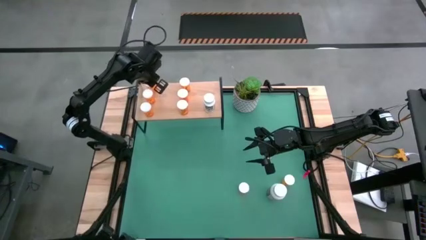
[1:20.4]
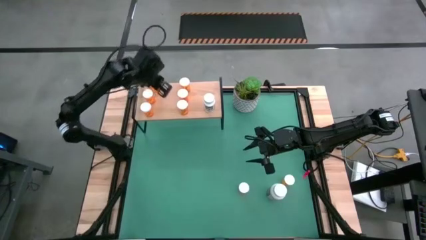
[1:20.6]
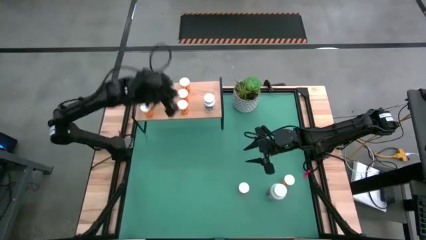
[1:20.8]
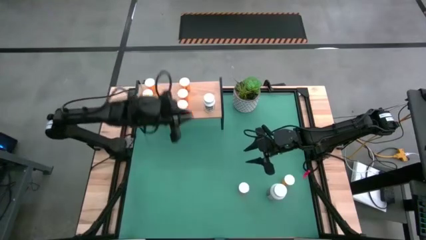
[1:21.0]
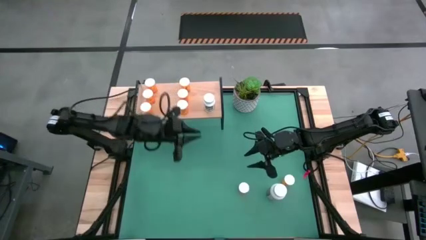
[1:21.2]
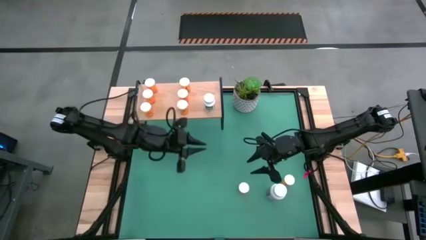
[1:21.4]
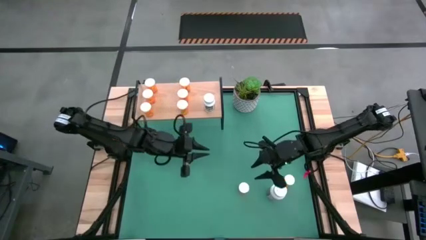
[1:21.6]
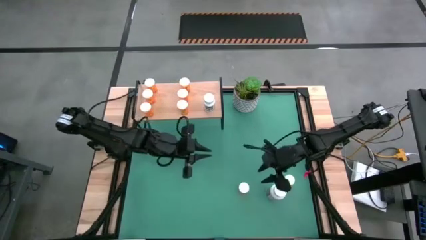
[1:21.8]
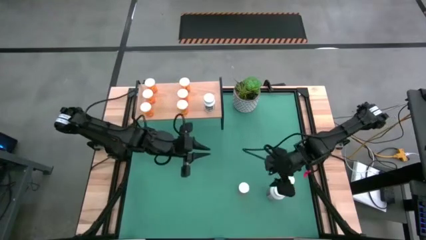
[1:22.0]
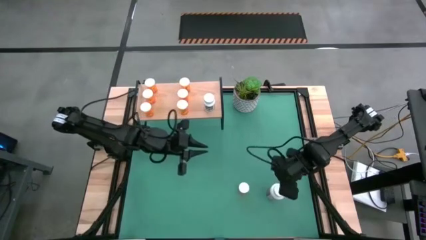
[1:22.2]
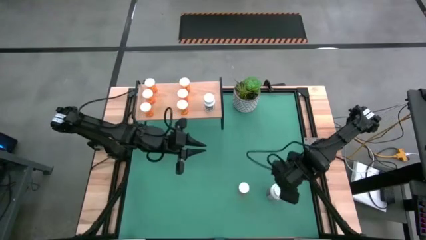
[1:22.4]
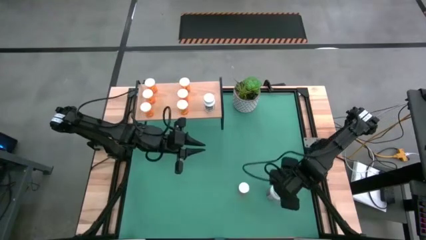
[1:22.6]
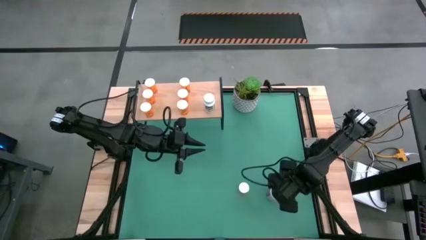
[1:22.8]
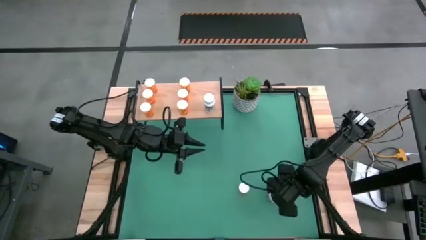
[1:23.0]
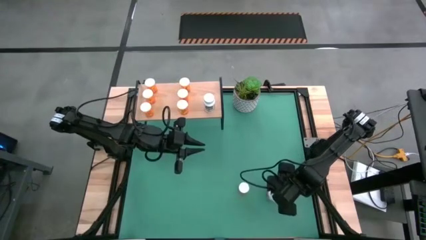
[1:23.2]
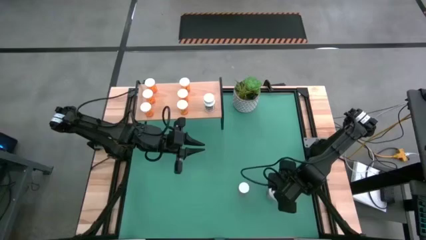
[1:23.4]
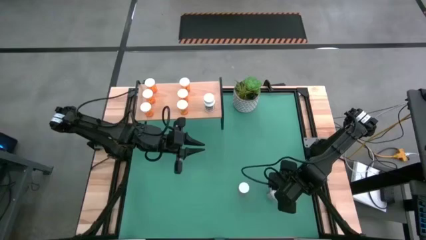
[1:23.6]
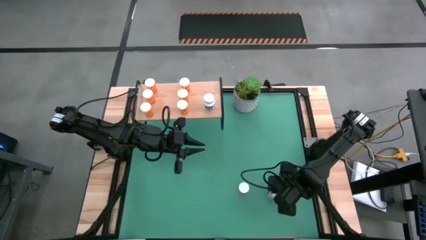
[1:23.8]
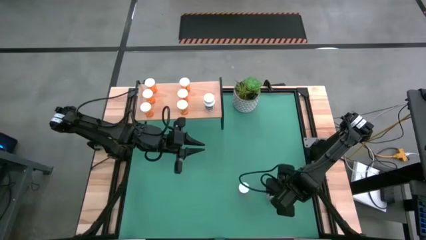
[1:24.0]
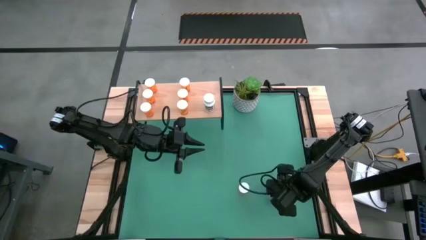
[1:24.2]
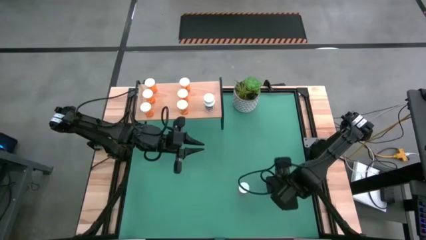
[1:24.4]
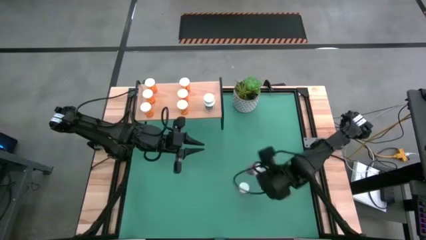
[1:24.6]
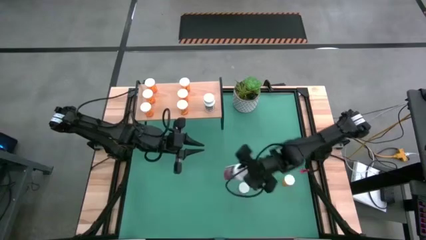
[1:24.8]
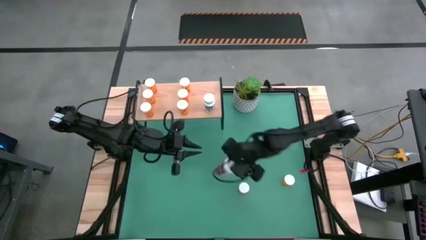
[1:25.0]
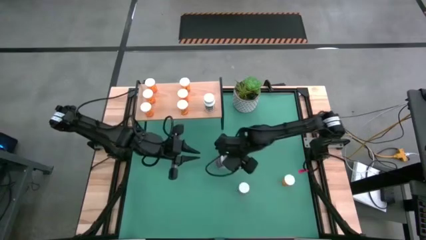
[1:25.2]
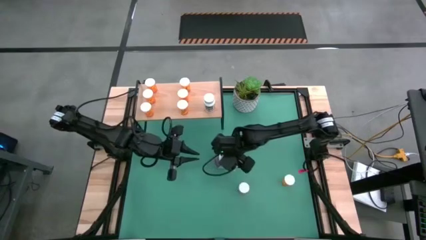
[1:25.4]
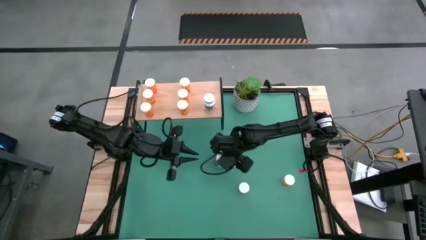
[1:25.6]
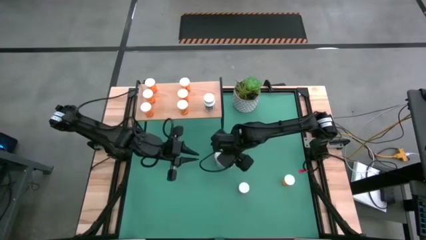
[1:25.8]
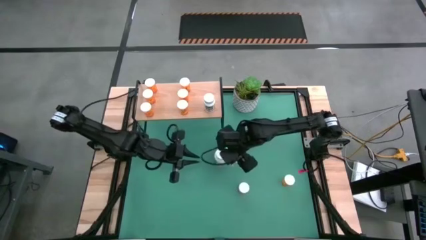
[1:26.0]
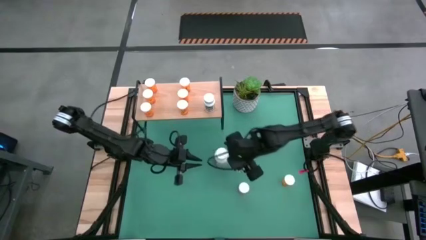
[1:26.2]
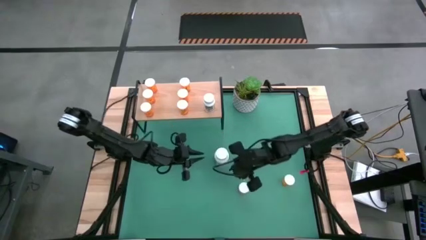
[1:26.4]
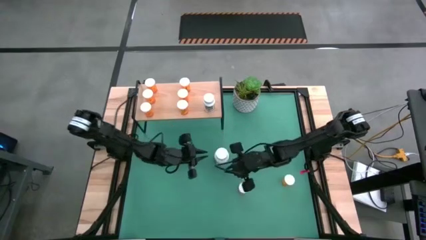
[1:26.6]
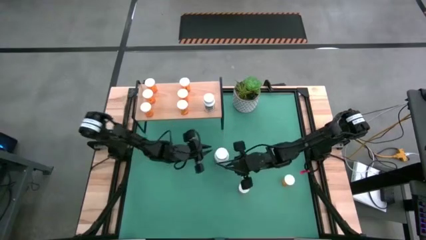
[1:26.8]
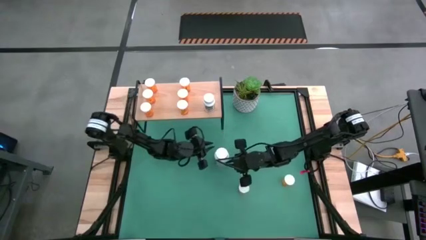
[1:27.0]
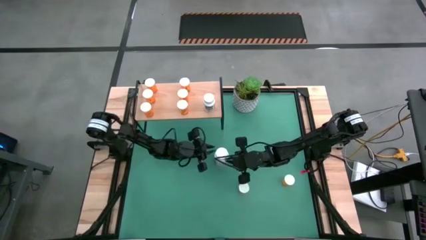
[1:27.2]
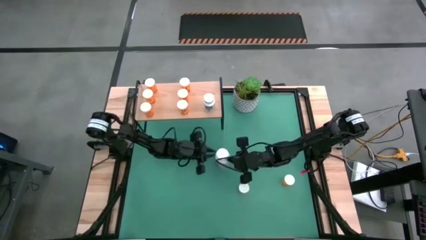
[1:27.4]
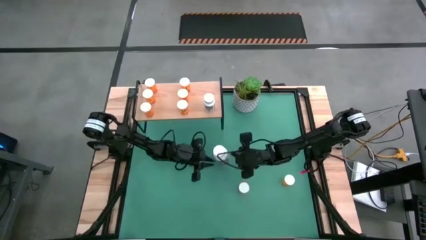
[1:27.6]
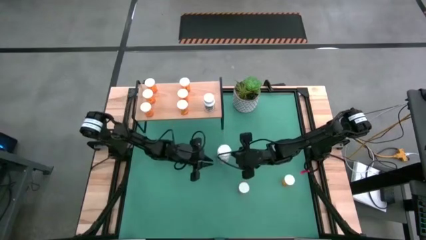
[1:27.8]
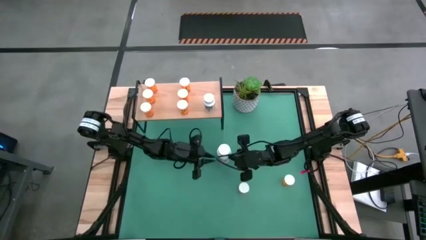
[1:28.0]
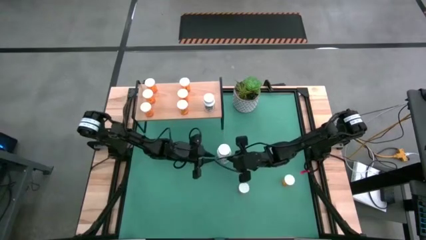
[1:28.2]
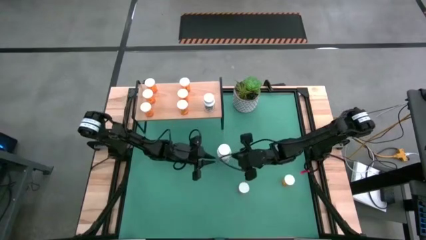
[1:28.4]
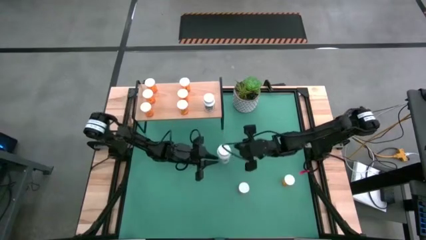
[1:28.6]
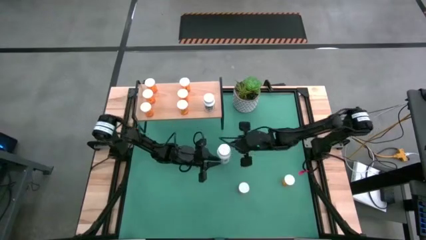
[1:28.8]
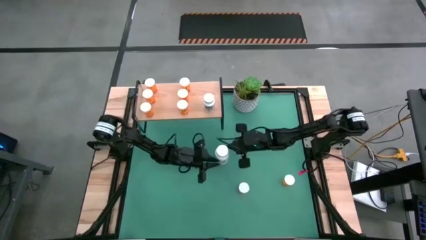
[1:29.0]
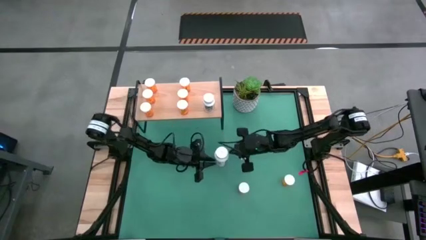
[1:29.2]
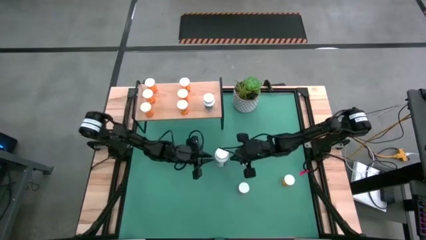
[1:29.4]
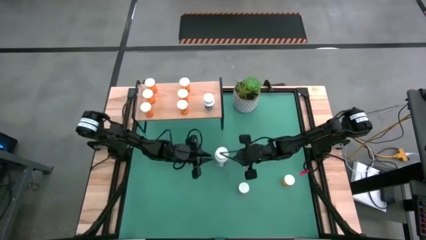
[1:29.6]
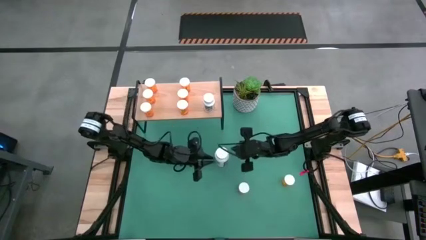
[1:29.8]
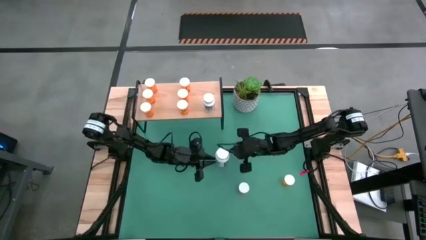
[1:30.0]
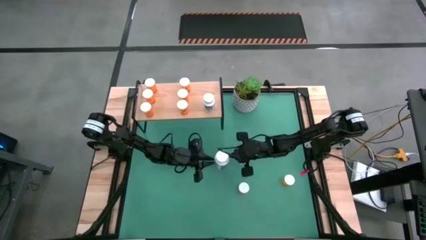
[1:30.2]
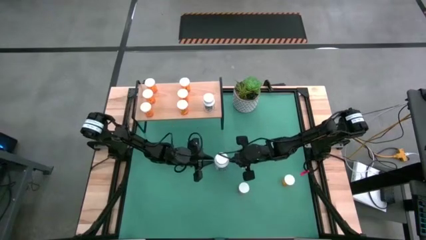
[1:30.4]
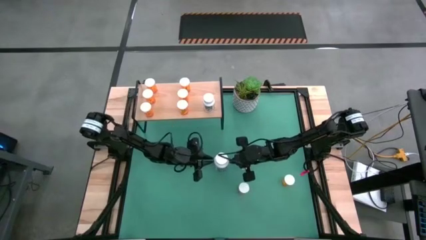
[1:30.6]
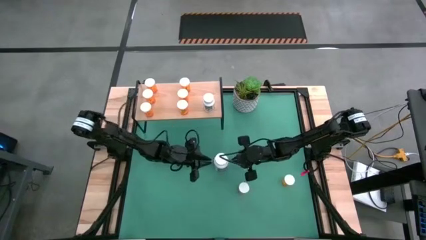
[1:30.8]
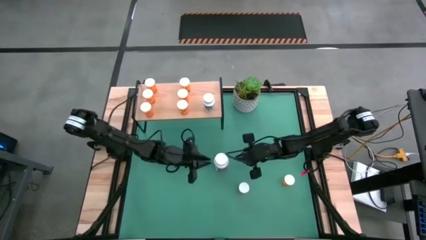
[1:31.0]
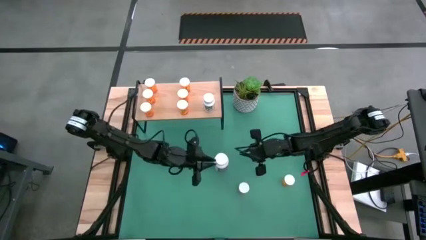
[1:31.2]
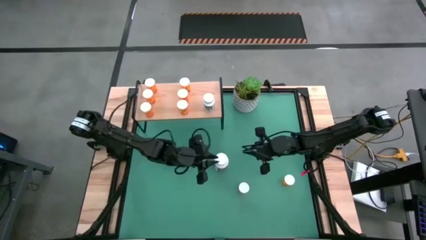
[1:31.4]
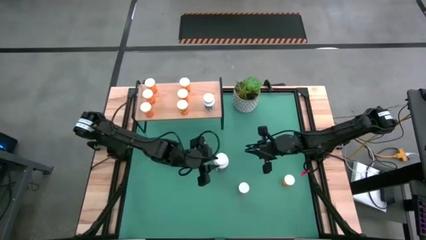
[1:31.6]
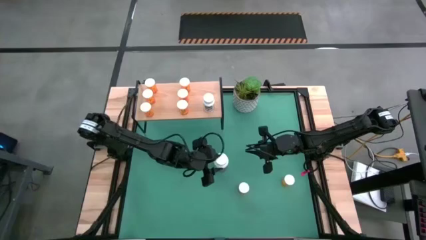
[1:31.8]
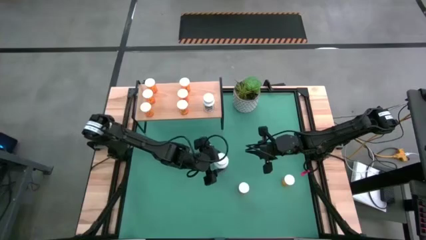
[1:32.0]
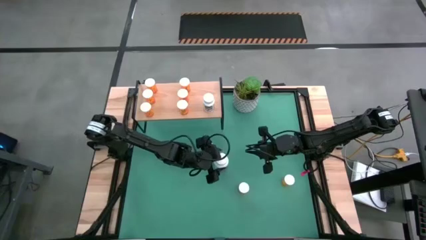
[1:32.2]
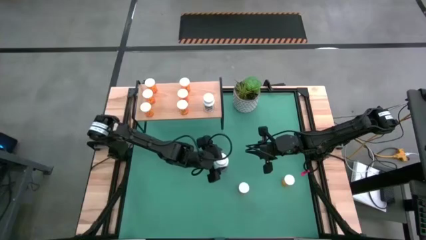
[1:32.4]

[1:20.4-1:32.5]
Task: Pick and place medicine bottles onto shelf by color
Put the large white pill bottle on the shelf
